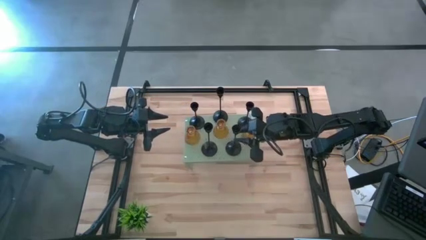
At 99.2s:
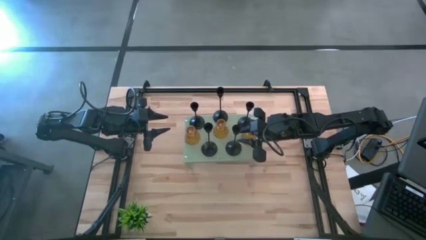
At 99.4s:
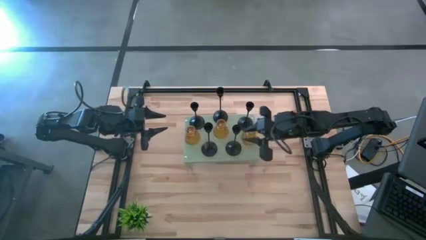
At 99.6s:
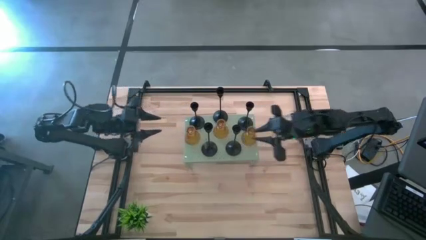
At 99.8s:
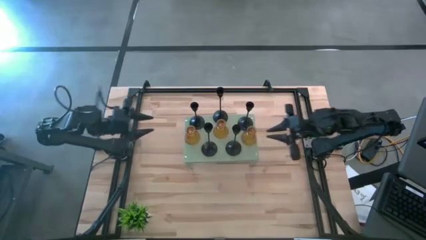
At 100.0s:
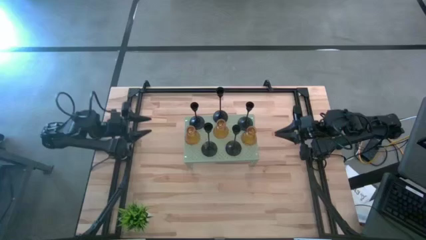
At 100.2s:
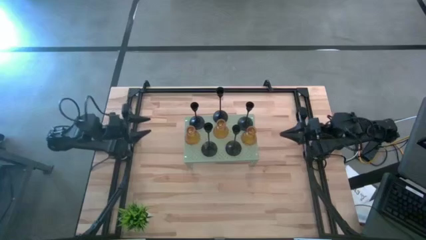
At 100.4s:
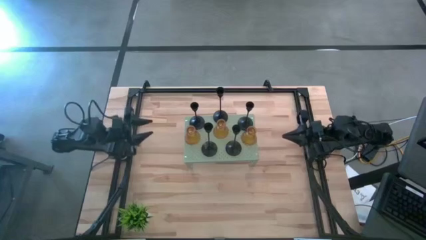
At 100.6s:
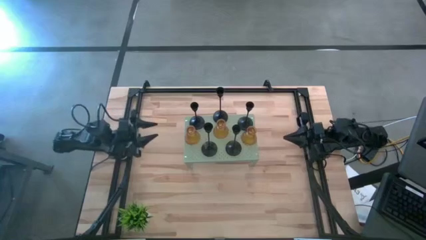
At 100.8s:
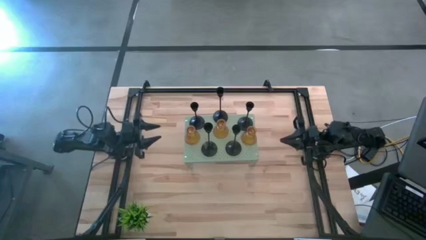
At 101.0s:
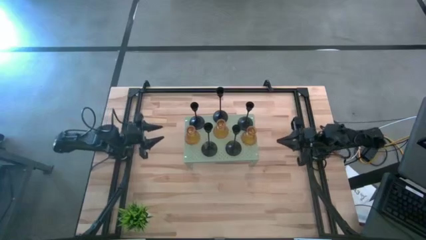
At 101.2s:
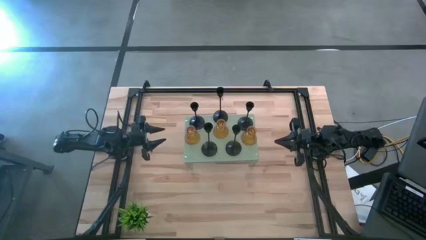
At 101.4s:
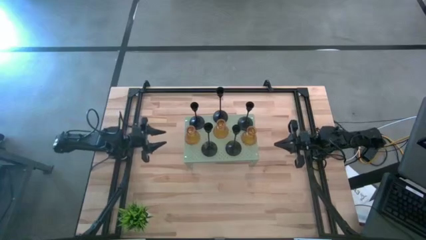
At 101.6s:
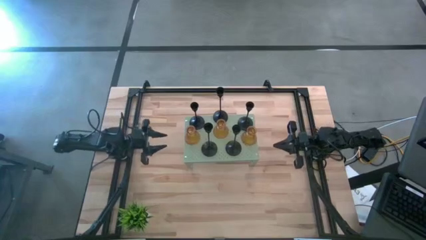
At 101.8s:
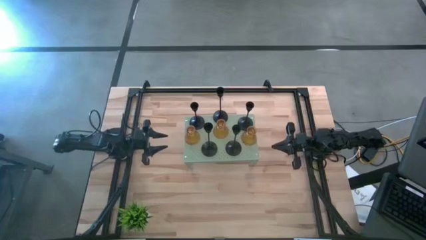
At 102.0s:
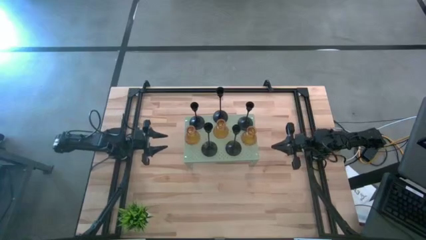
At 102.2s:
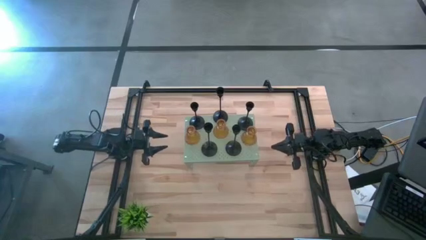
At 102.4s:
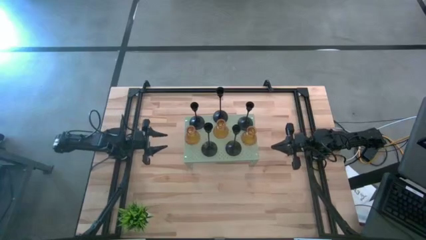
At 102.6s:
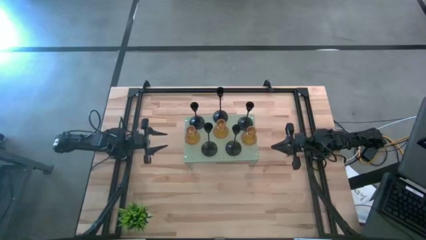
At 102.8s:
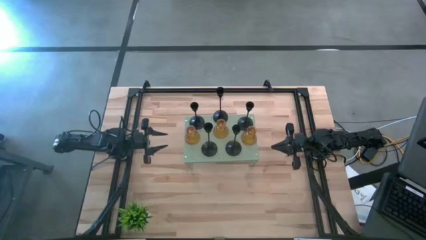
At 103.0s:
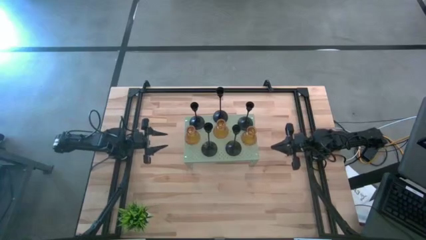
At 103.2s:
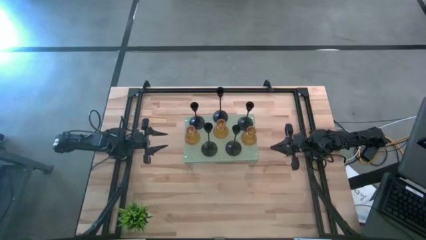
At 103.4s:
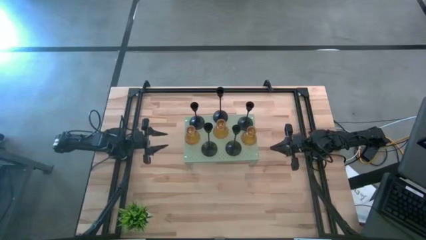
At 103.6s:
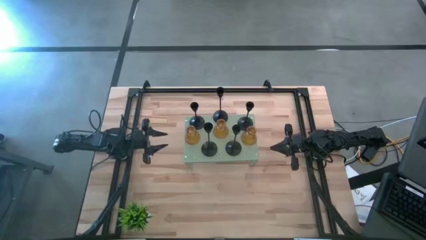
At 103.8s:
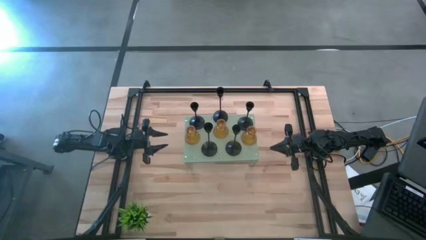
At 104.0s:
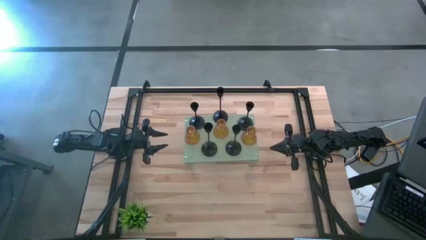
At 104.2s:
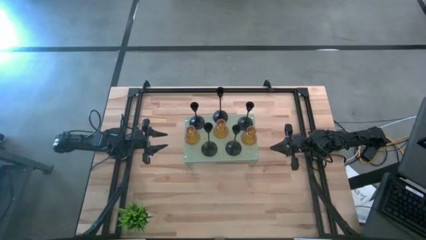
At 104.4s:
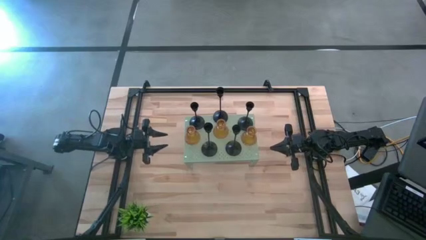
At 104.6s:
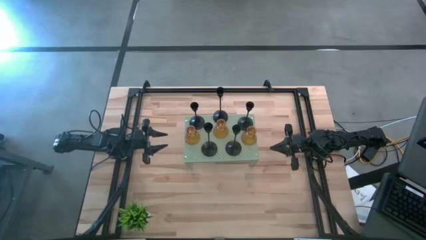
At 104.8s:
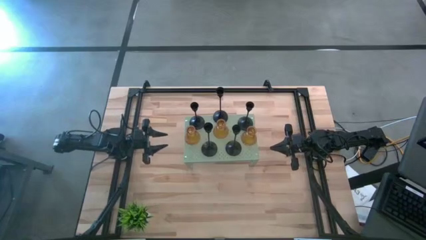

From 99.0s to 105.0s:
Task: Pick & Place candle stick holders
Return to Home Position

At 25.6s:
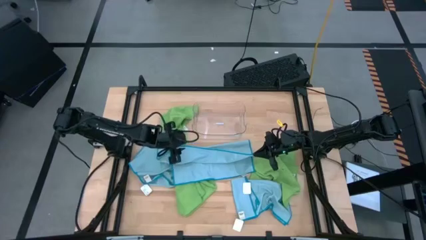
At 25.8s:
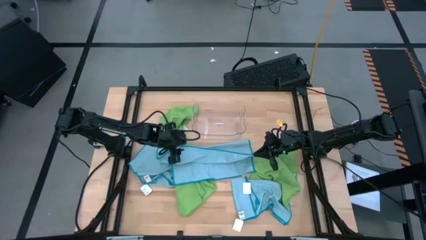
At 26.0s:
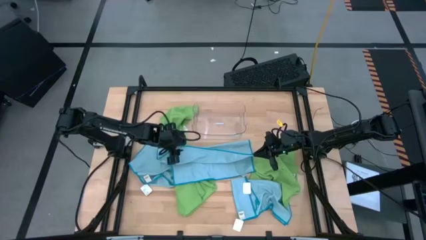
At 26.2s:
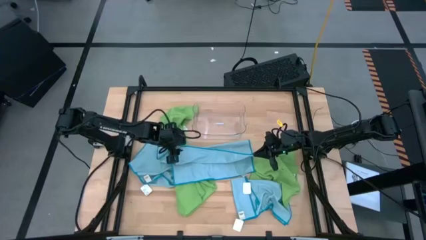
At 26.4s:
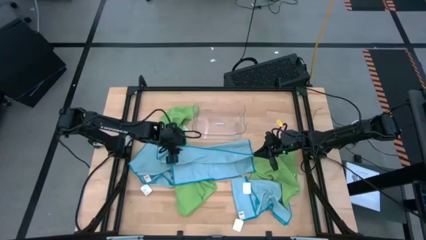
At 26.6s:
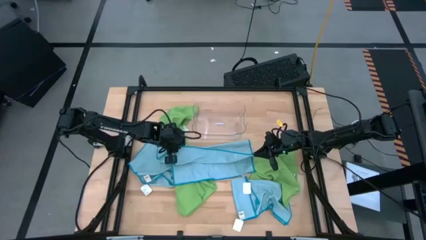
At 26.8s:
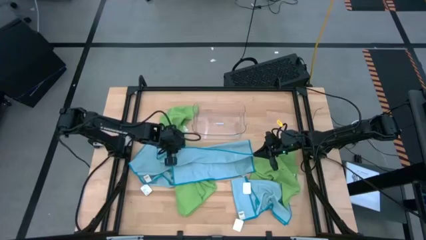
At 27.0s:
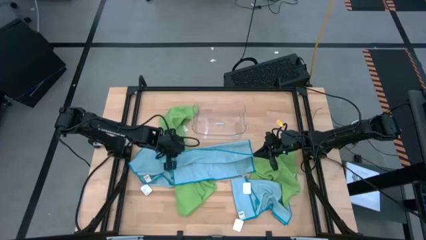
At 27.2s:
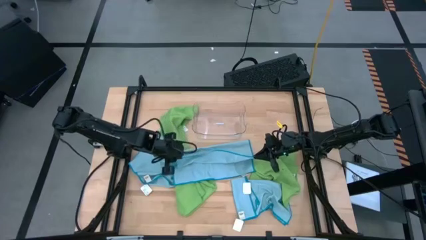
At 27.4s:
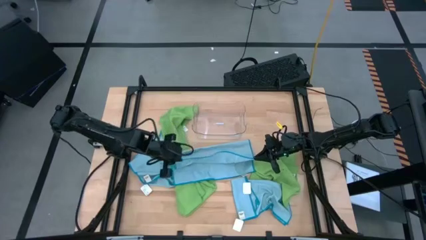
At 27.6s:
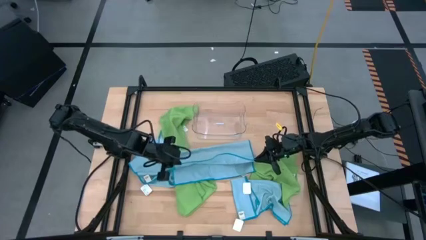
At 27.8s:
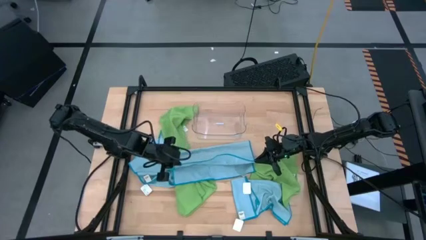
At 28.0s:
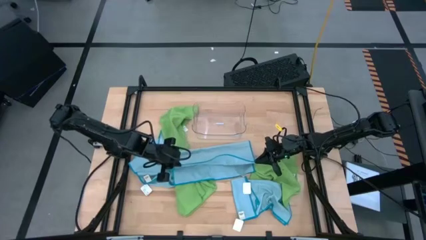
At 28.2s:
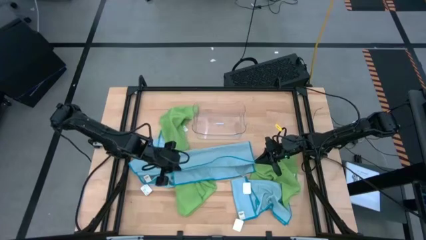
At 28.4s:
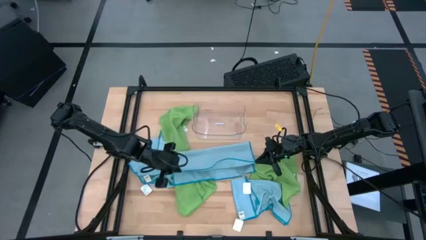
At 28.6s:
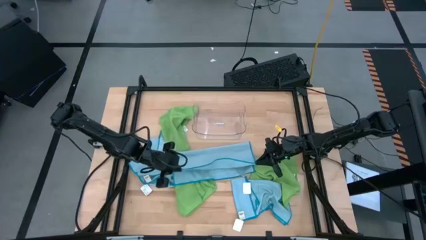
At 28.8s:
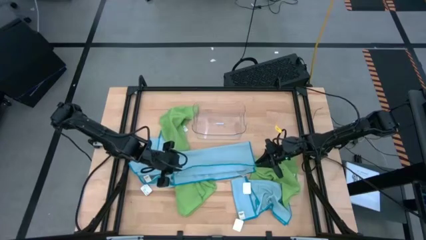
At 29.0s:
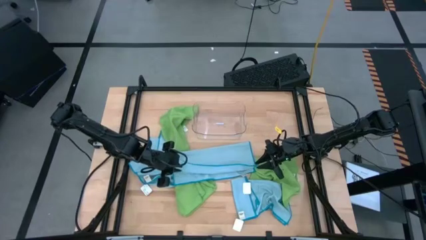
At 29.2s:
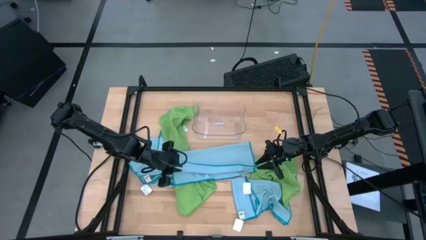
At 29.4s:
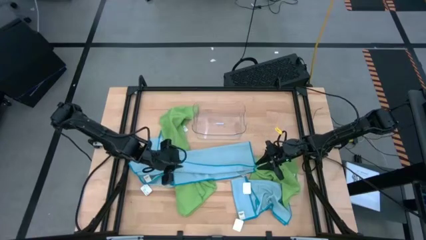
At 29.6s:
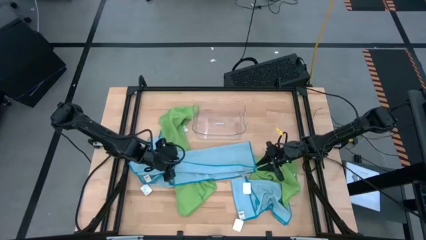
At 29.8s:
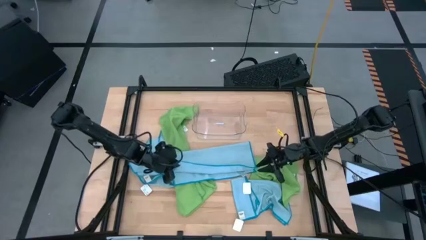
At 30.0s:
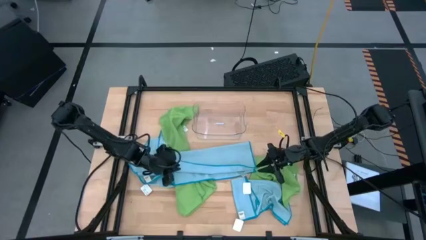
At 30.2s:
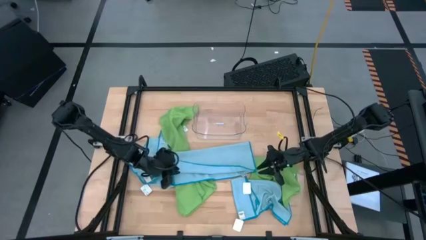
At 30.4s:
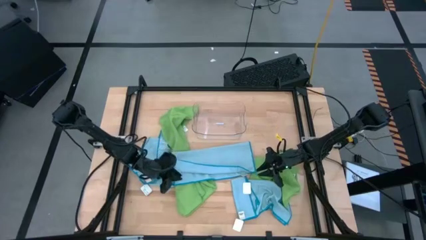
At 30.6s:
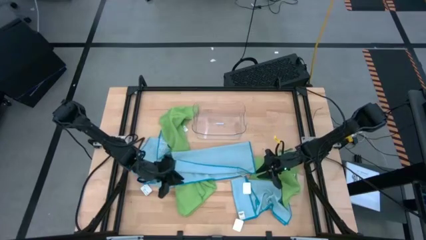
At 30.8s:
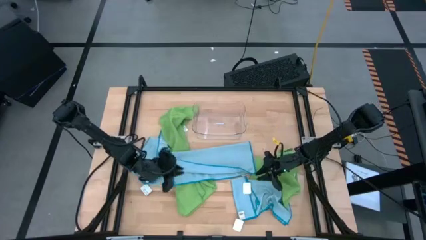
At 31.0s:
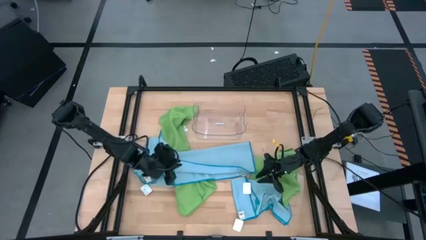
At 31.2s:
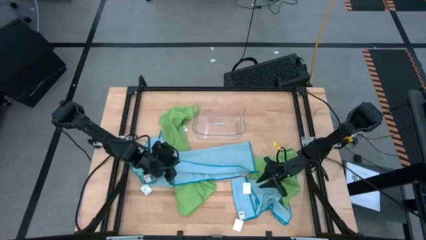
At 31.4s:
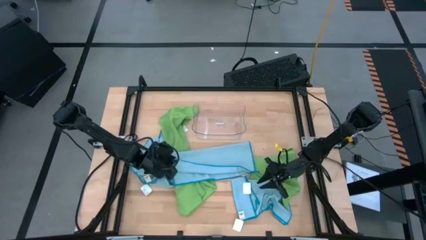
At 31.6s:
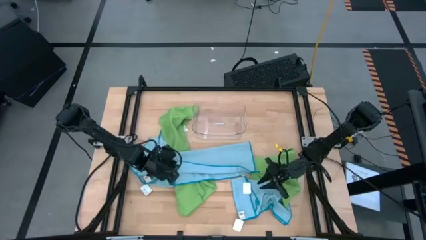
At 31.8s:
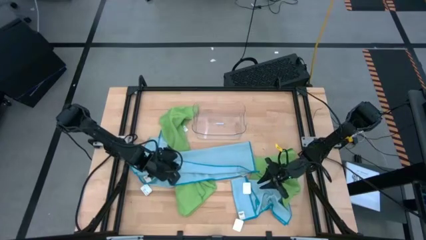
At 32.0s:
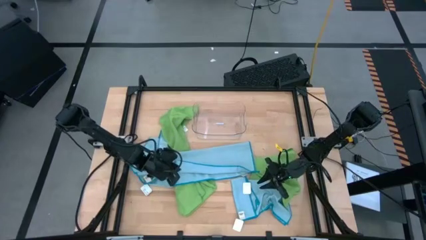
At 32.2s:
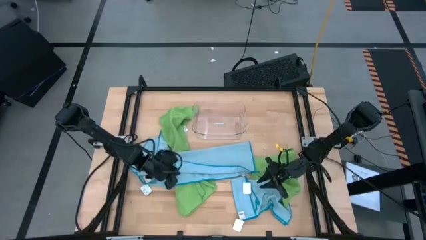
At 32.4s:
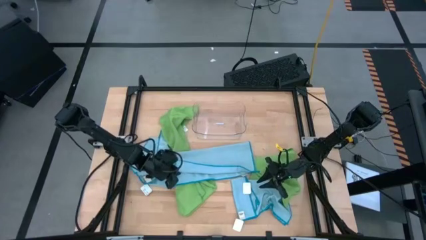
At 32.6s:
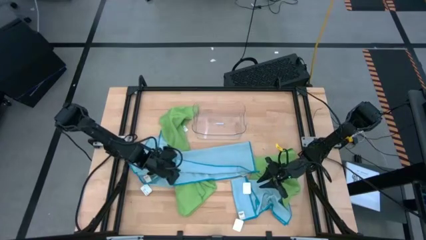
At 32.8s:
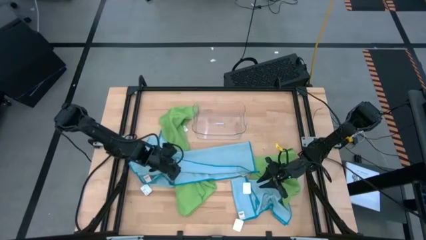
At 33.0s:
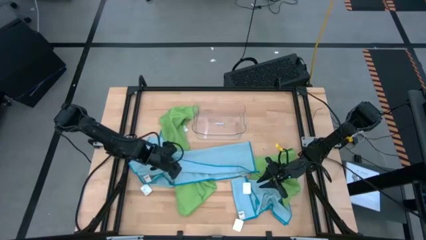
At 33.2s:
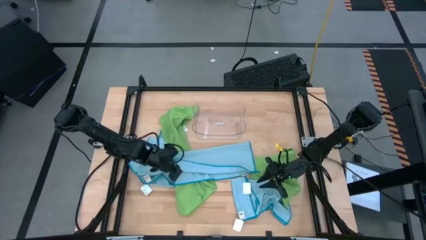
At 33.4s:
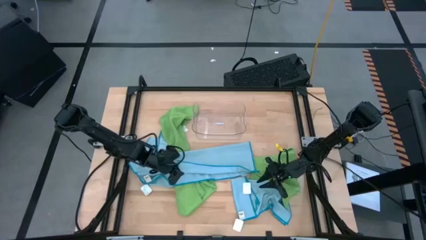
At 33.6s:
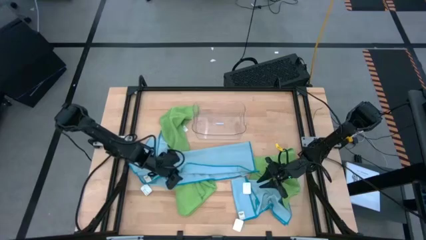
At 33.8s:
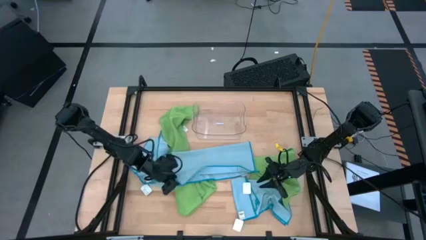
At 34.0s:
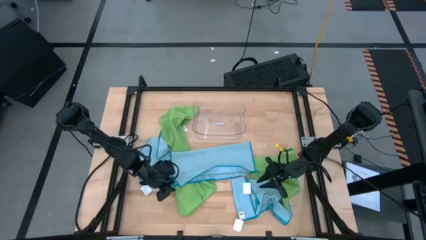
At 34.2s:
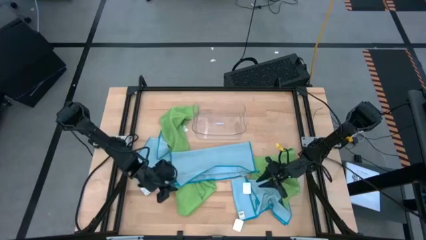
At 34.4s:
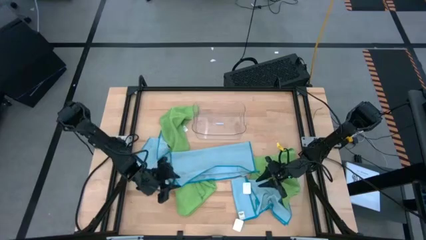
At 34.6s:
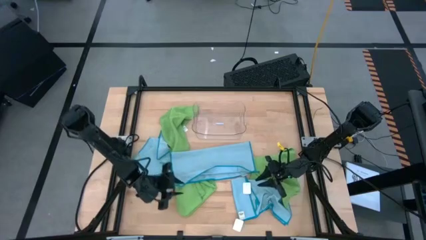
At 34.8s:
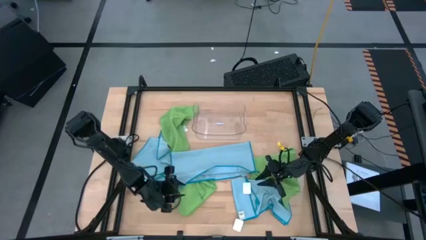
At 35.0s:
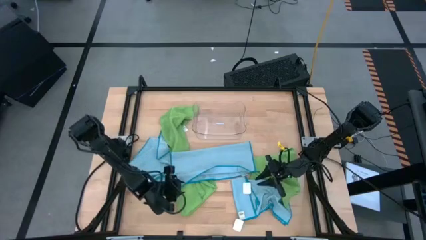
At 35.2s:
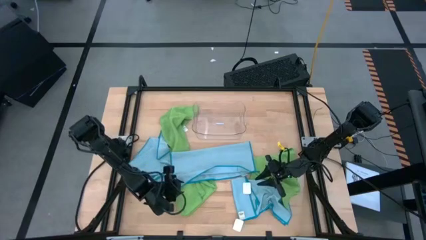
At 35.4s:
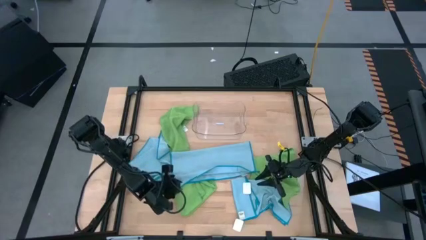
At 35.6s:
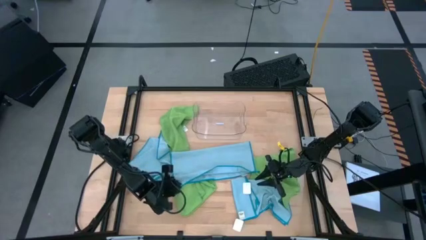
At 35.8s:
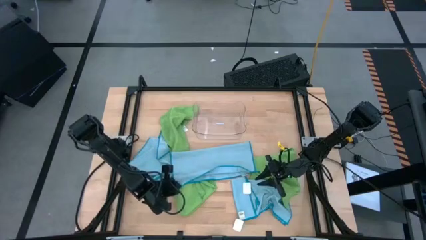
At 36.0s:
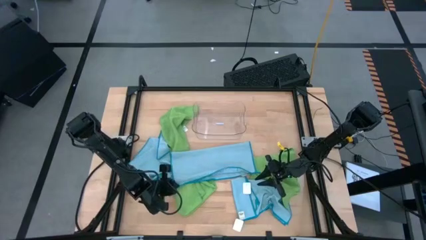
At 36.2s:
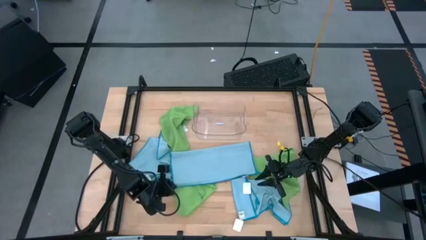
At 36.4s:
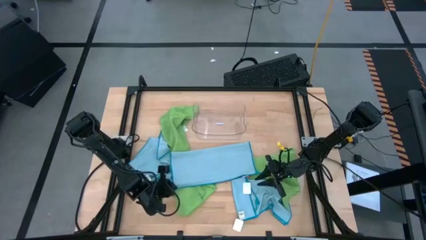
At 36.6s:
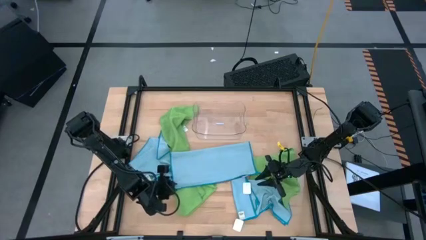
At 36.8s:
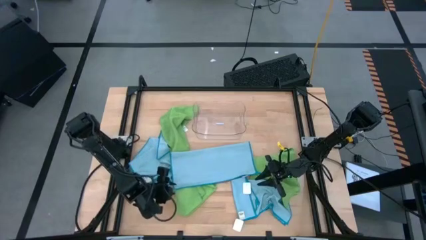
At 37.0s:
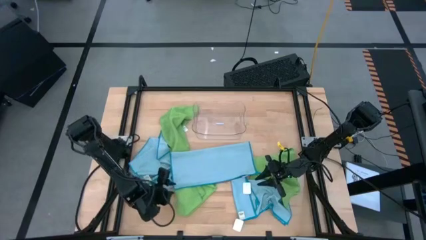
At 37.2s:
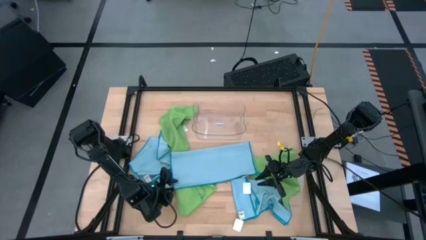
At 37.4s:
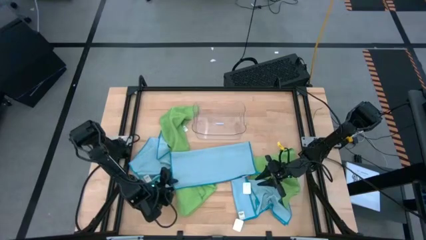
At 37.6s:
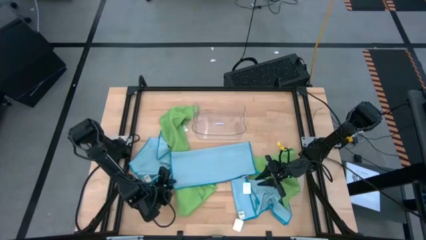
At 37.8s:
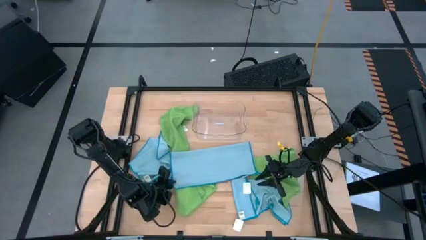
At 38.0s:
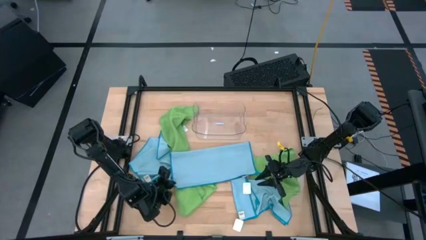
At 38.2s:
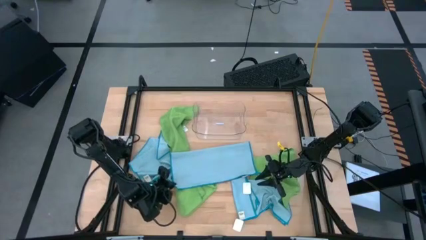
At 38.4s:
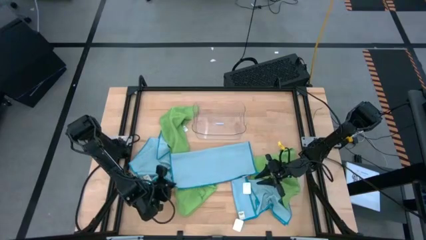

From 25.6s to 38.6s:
Task: Fold microfiber towels
Fold the top right blue microfiber cloth
